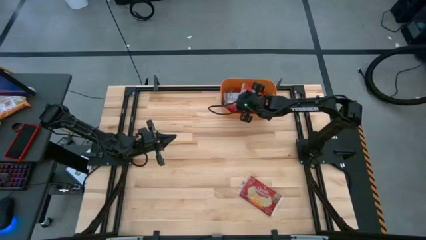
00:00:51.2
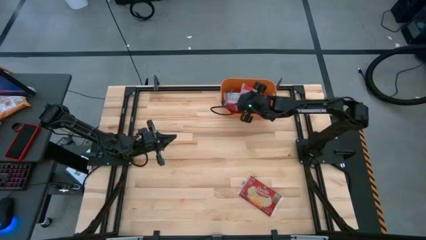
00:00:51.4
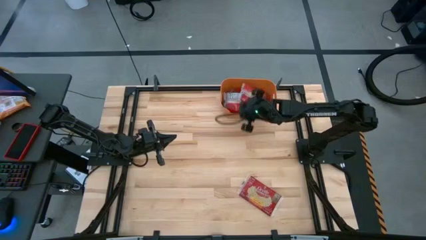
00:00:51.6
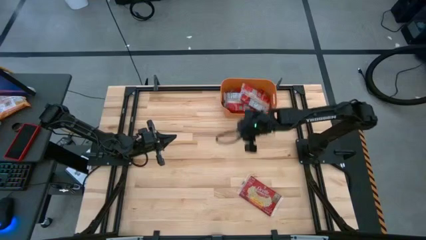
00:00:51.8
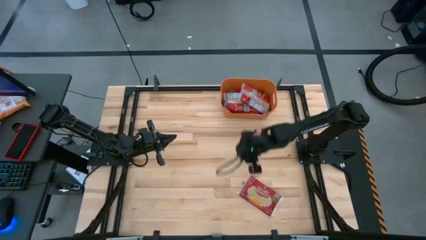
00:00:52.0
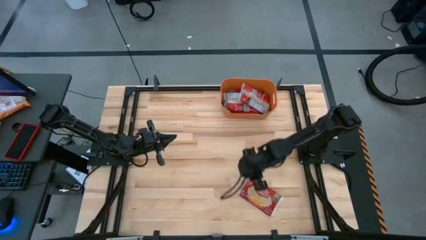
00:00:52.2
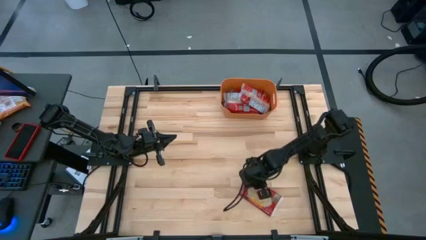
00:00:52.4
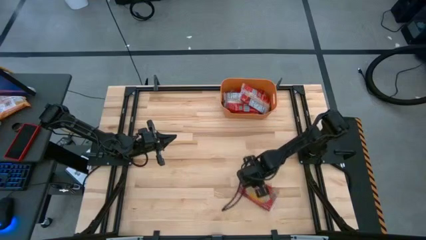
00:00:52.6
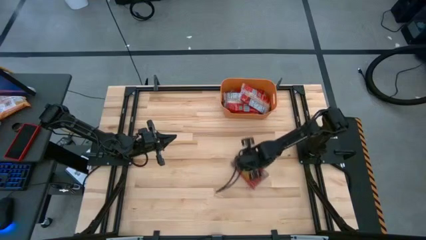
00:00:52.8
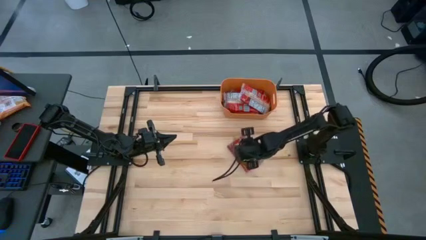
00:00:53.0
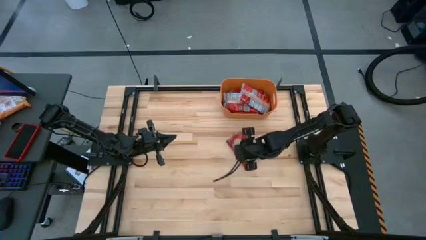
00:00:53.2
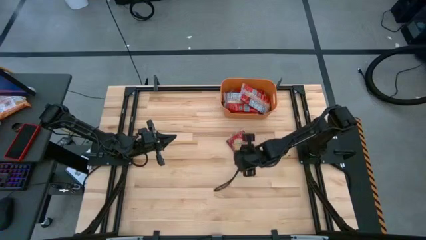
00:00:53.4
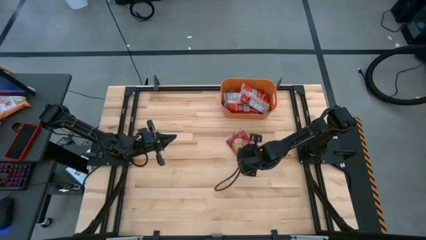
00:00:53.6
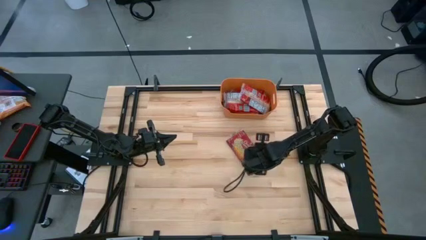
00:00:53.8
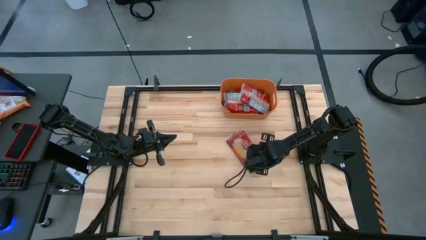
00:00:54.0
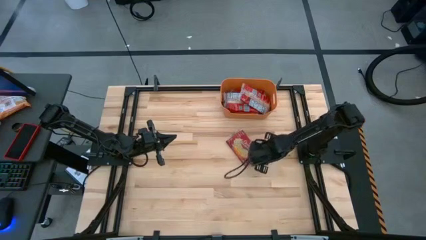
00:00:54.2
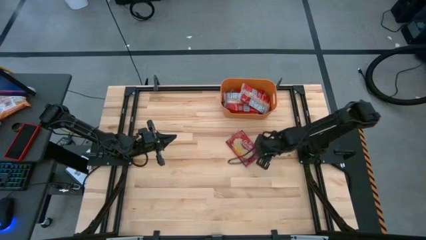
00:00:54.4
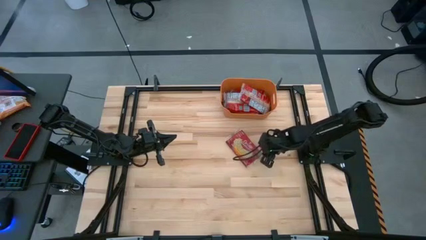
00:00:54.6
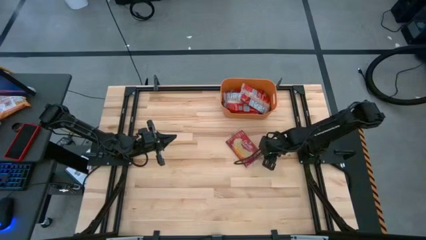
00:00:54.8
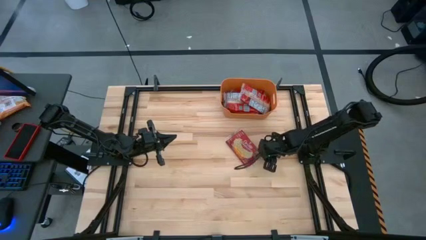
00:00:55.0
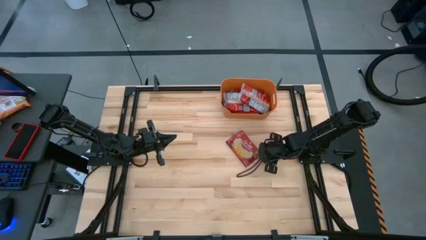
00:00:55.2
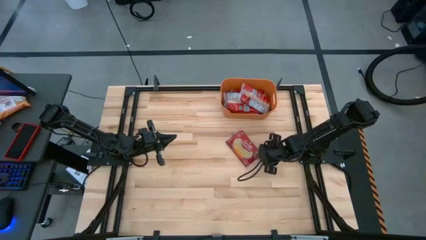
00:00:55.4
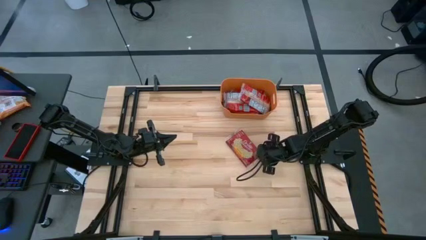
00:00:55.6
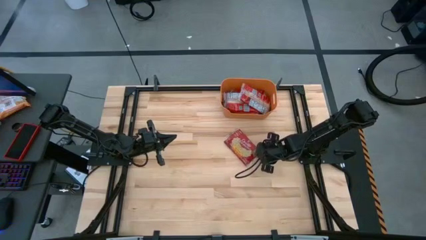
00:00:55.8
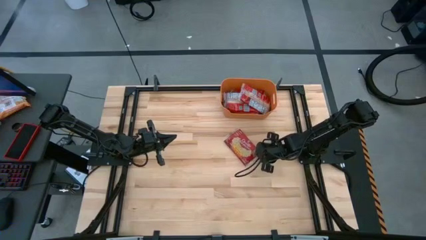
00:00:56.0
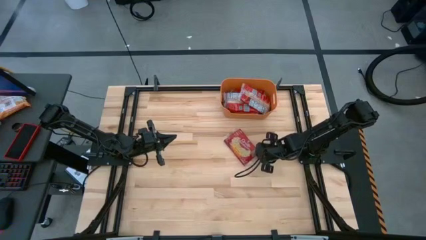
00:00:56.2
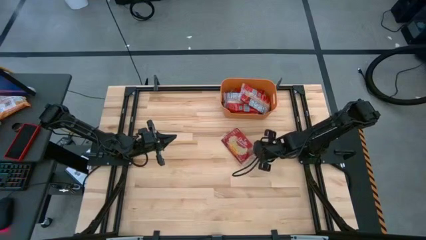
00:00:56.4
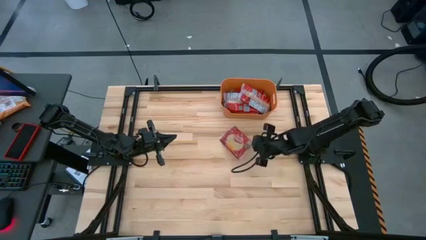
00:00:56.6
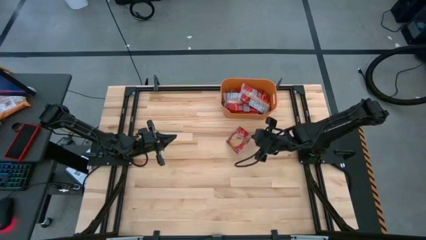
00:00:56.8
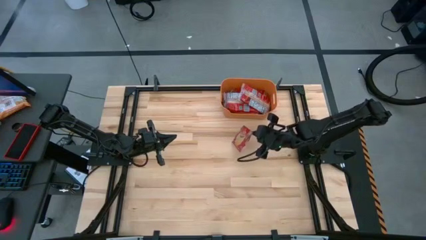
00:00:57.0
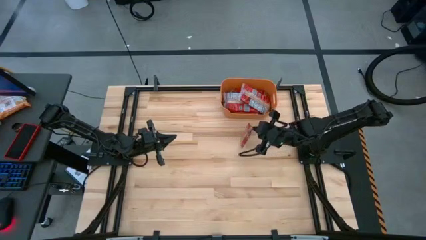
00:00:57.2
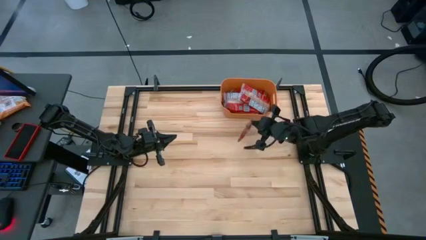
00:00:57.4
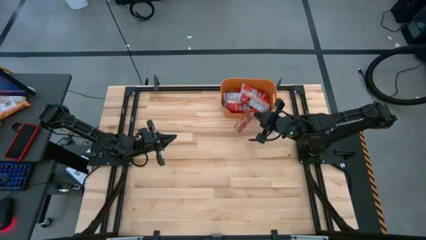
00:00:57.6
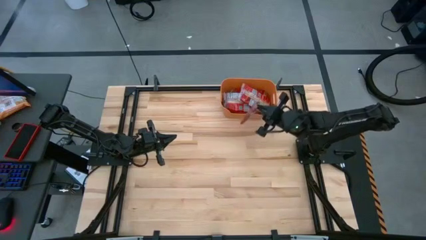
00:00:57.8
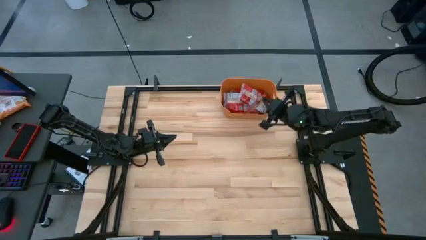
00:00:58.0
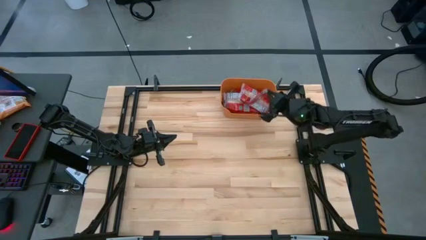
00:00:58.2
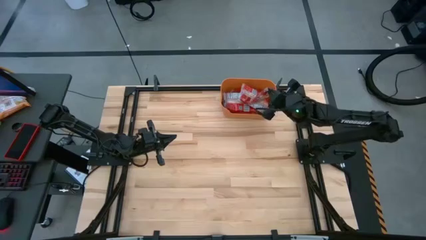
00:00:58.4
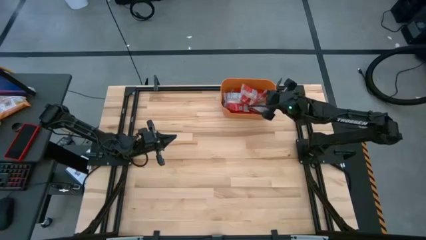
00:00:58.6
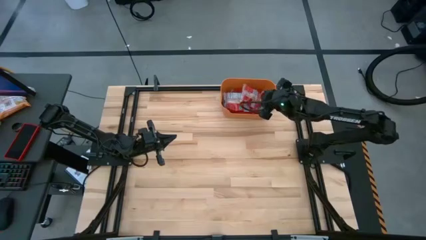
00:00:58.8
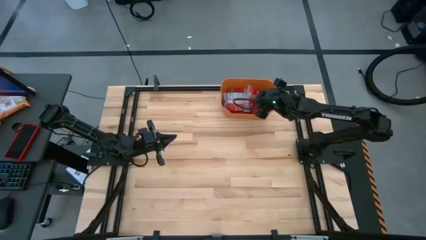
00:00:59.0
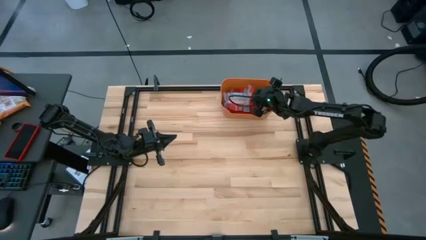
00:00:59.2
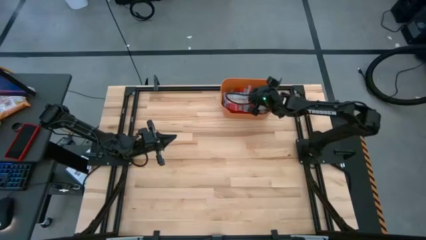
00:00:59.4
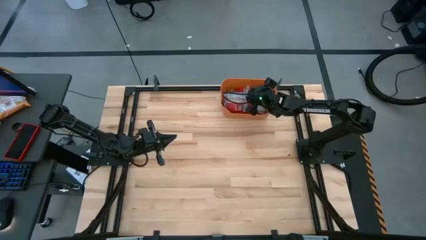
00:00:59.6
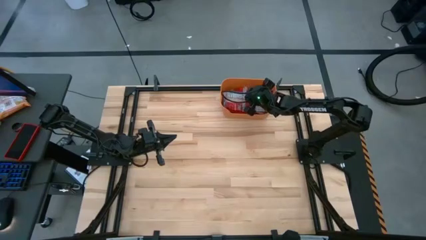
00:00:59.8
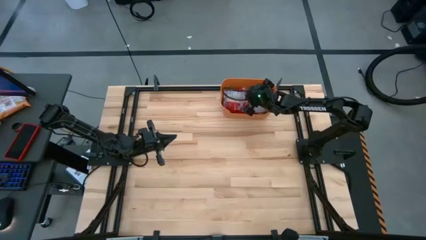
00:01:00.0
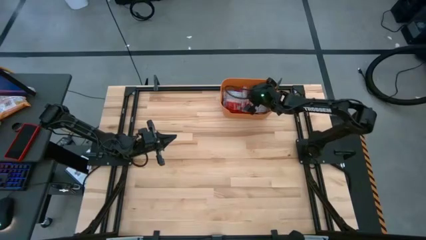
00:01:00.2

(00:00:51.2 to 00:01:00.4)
Task: Sort popcorn bags into baskets
Put the red popcorn bag into the orange bin

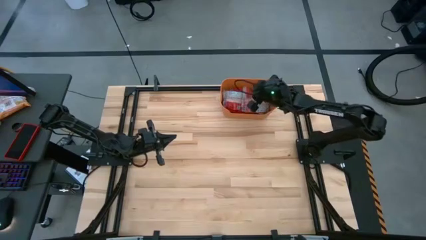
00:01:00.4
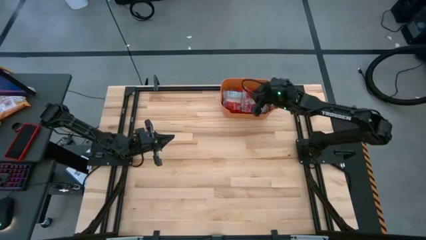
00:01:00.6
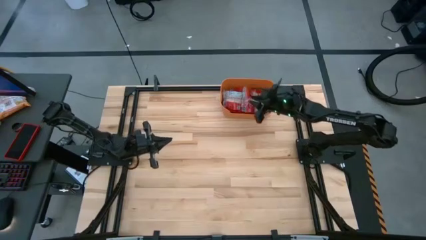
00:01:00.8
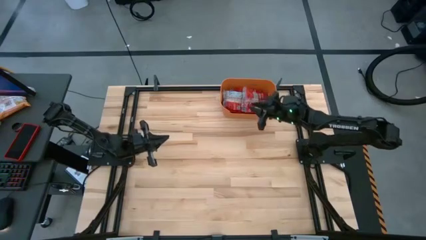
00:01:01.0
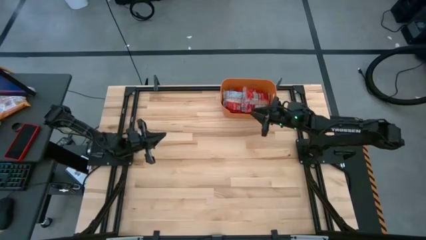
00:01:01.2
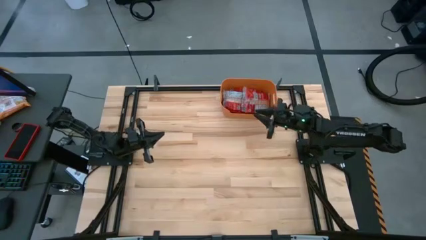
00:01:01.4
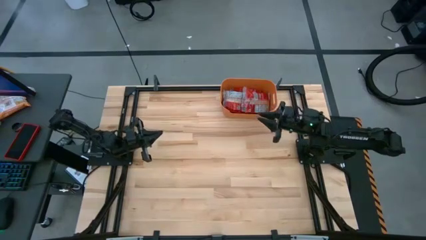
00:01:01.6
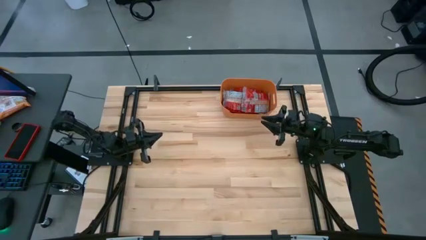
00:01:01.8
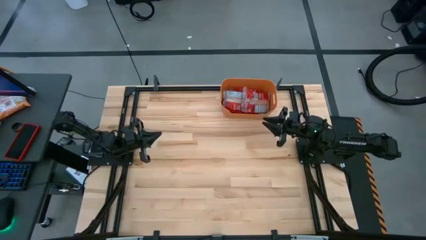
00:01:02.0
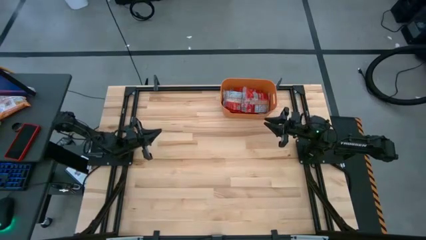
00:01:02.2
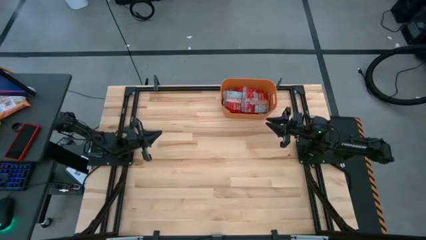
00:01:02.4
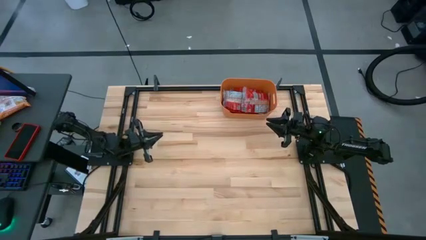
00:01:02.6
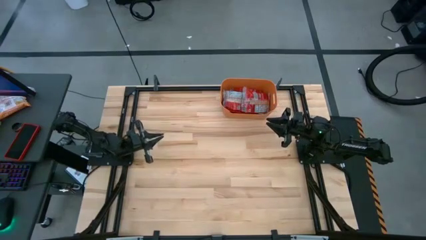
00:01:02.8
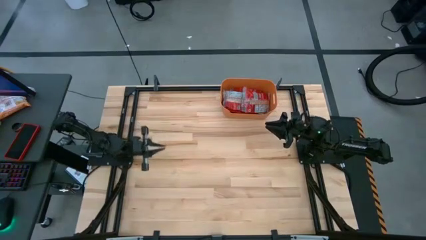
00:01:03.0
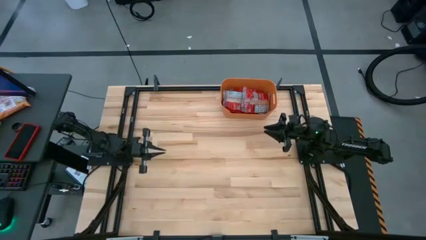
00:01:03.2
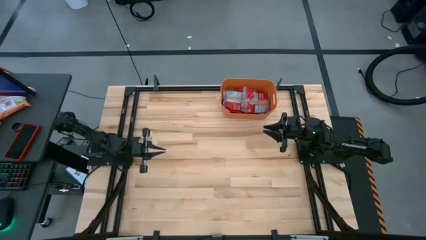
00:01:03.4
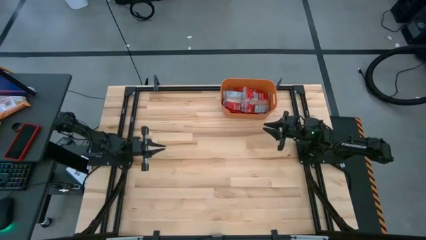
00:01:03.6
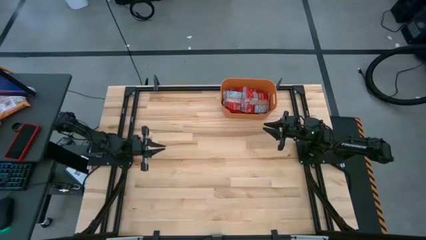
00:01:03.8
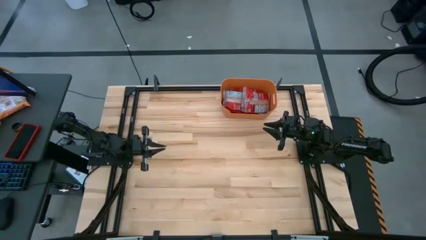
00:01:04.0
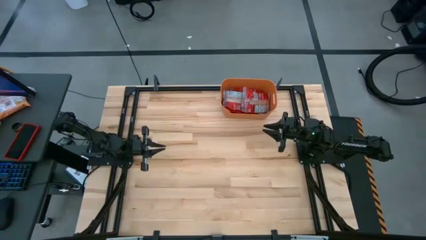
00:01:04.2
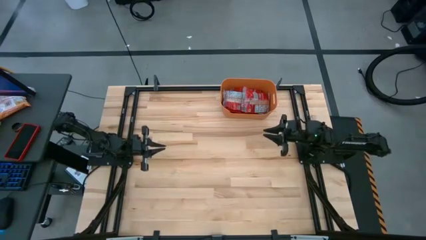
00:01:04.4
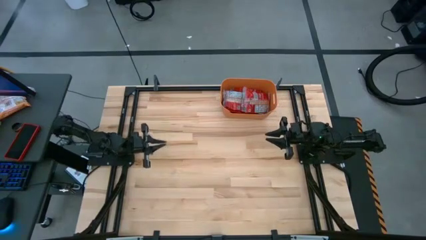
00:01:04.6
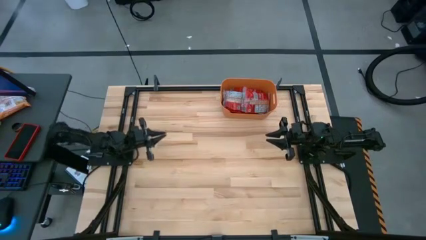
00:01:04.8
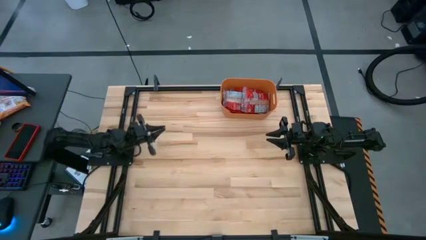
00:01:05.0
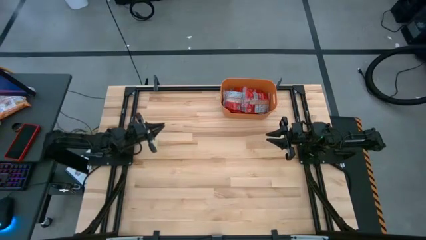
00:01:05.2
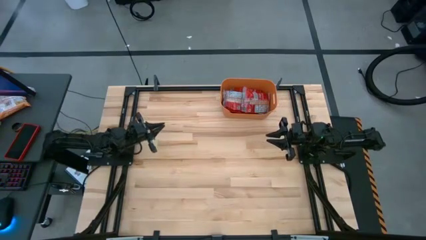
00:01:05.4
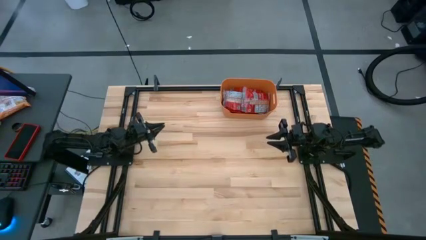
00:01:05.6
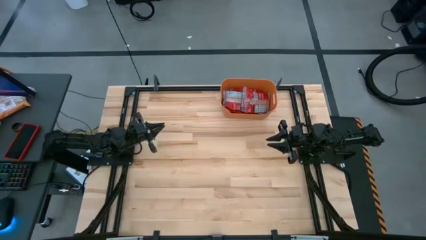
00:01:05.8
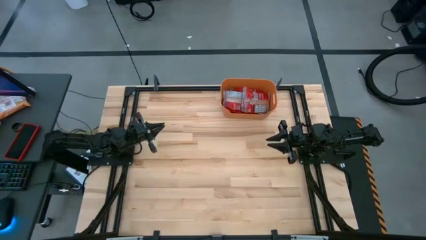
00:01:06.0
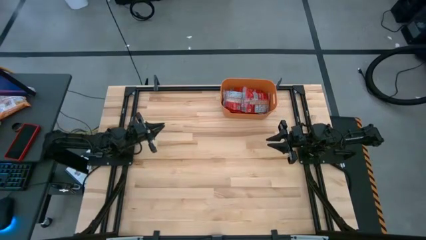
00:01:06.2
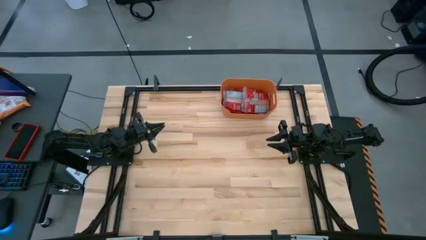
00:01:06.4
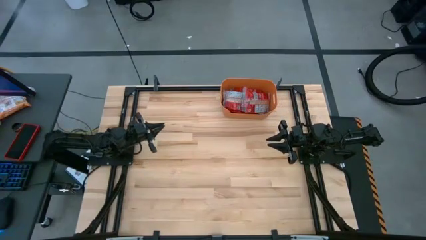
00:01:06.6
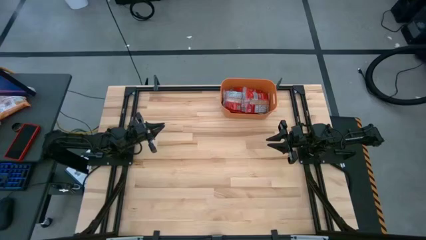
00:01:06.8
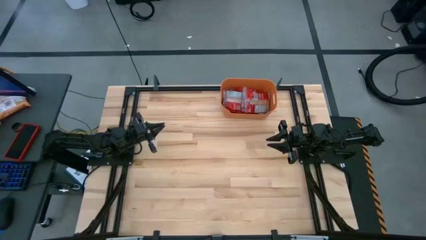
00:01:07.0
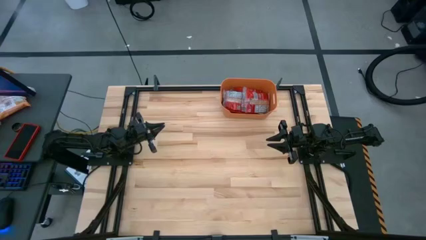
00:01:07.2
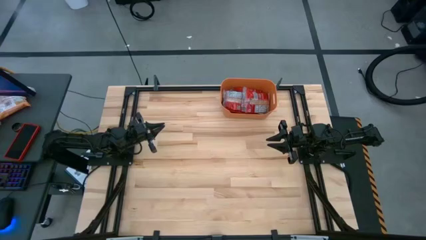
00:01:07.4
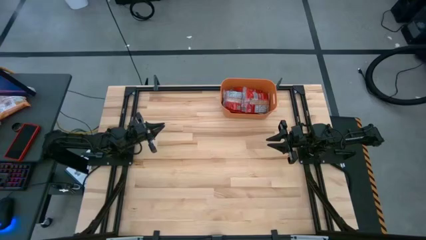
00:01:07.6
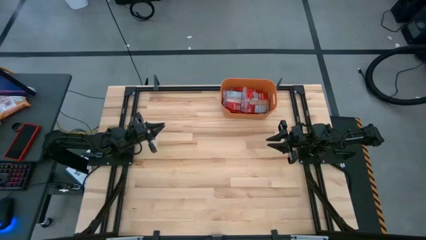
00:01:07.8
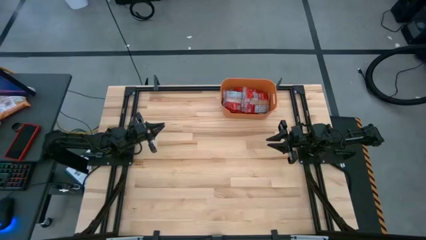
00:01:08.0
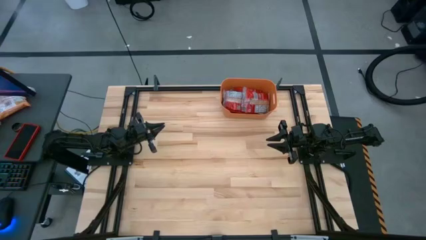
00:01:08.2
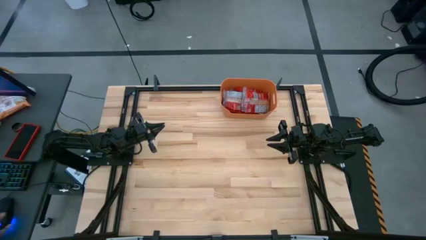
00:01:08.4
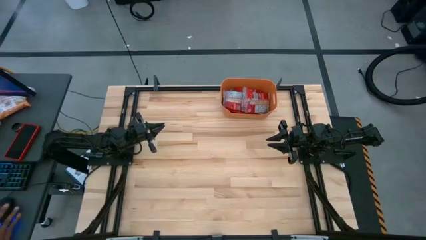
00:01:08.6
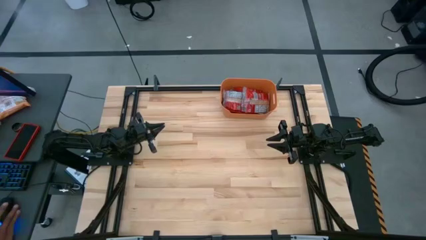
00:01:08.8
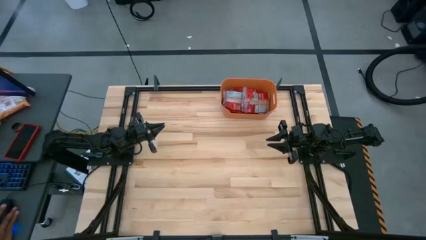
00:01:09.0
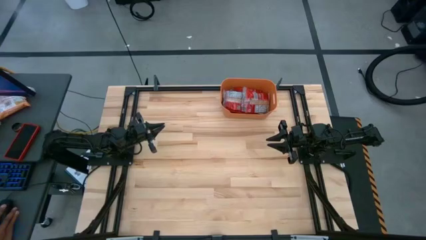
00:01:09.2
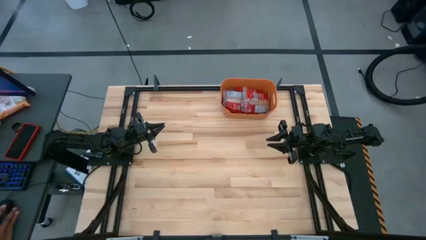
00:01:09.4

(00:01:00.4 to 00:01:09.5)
Return to Home Position
